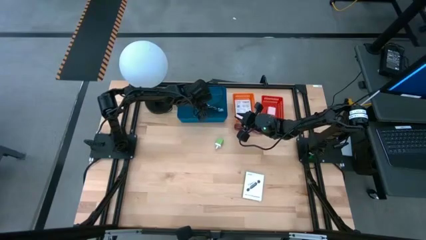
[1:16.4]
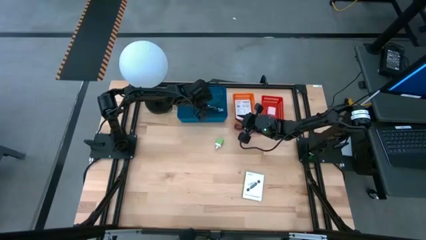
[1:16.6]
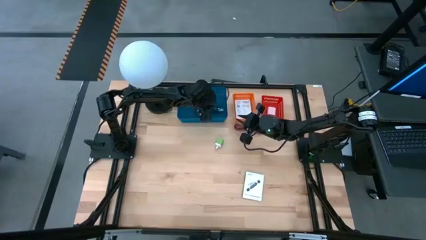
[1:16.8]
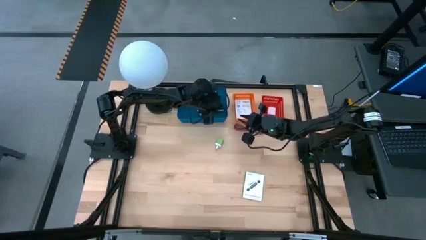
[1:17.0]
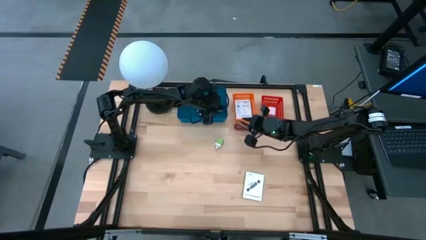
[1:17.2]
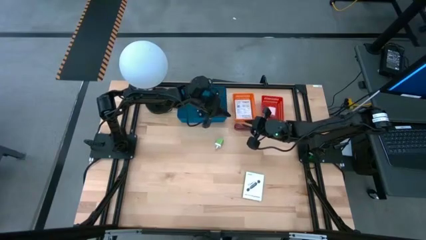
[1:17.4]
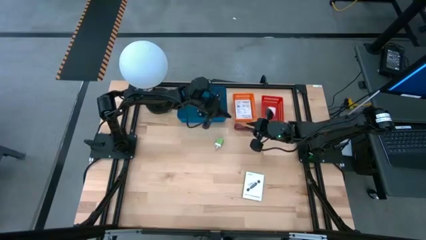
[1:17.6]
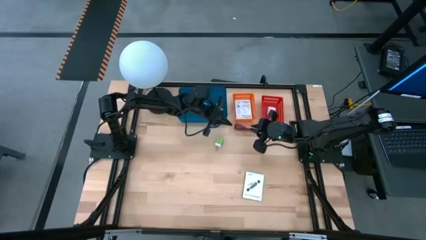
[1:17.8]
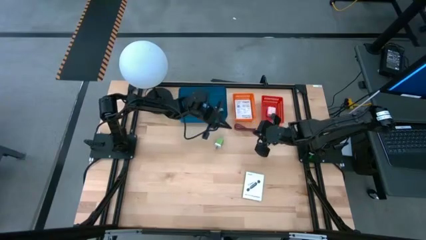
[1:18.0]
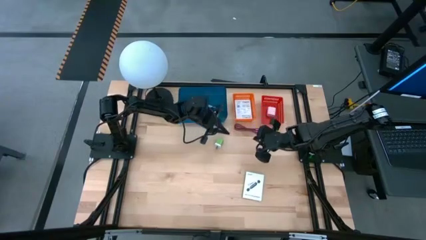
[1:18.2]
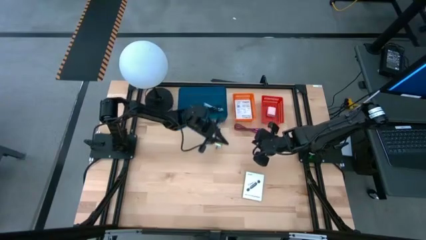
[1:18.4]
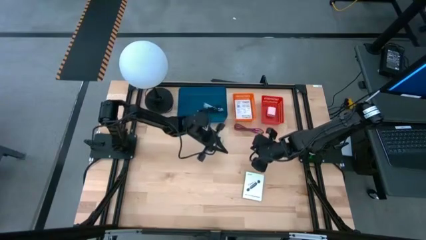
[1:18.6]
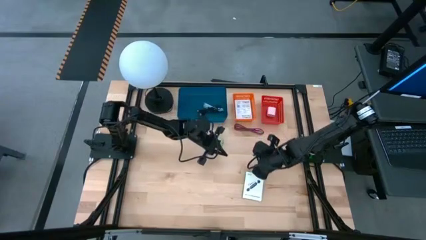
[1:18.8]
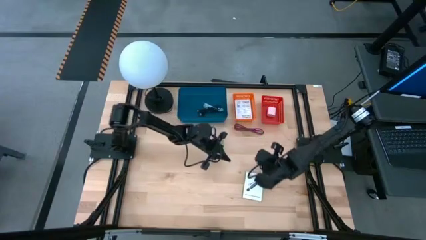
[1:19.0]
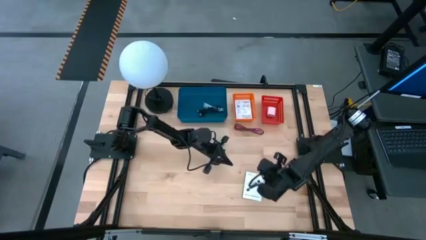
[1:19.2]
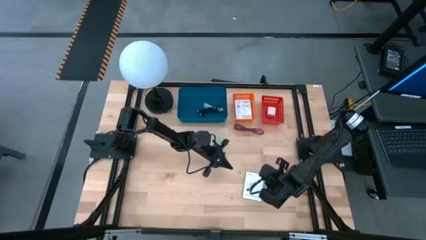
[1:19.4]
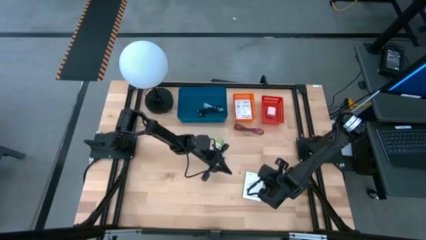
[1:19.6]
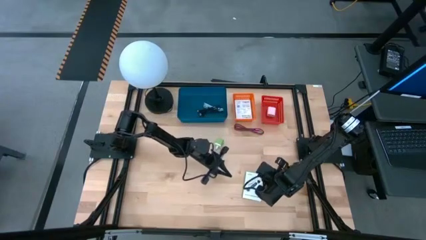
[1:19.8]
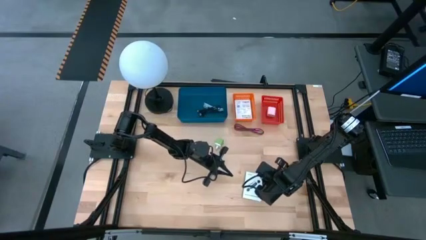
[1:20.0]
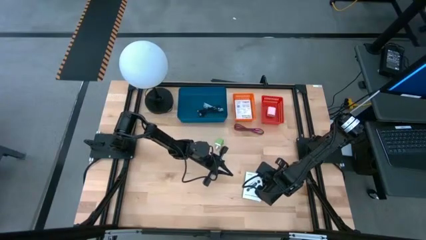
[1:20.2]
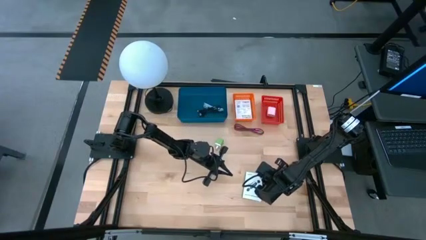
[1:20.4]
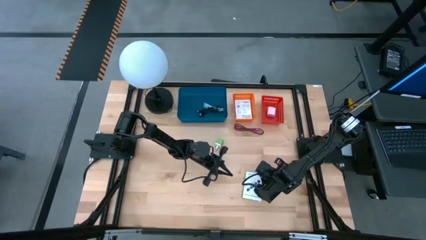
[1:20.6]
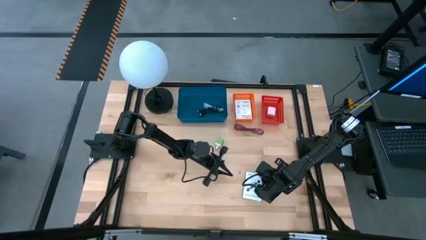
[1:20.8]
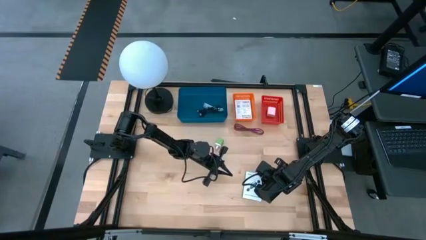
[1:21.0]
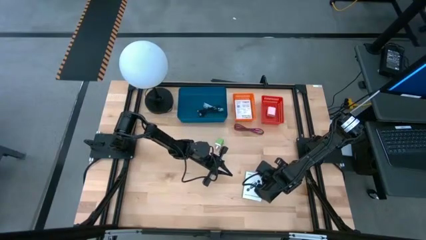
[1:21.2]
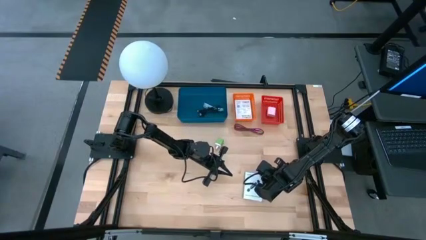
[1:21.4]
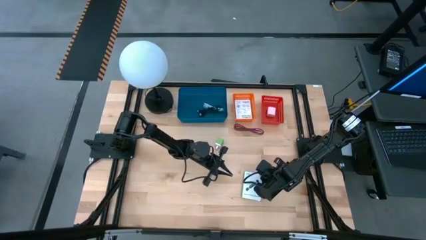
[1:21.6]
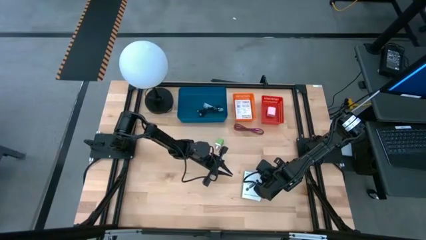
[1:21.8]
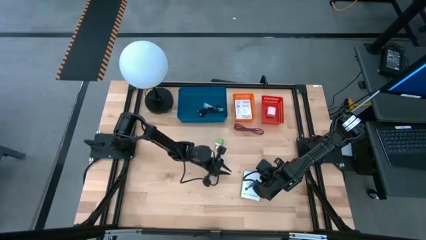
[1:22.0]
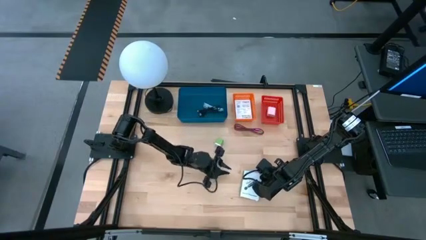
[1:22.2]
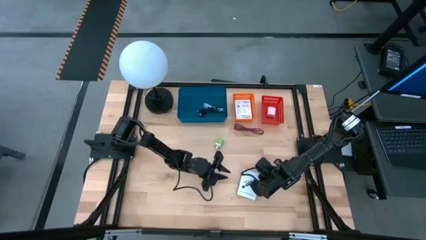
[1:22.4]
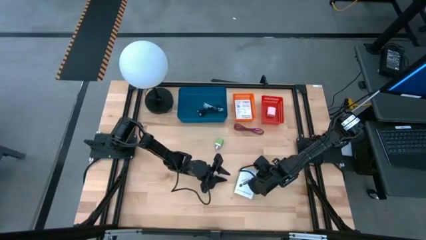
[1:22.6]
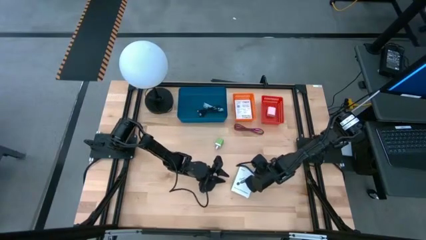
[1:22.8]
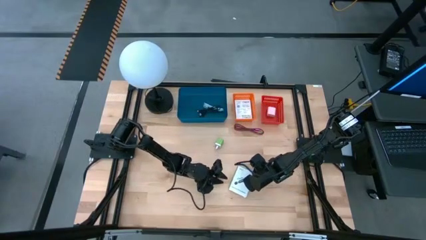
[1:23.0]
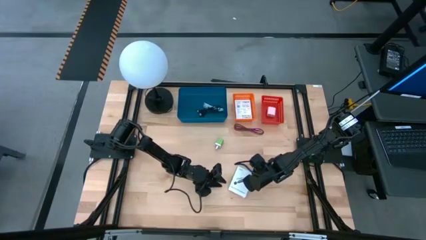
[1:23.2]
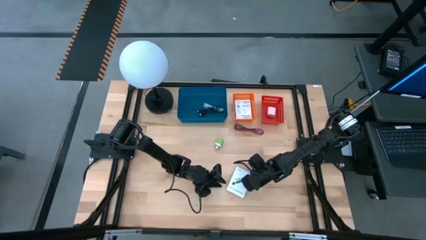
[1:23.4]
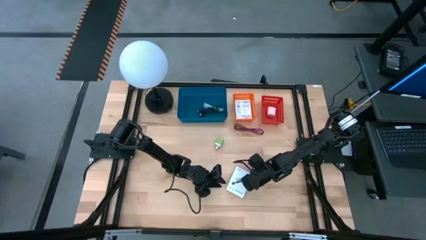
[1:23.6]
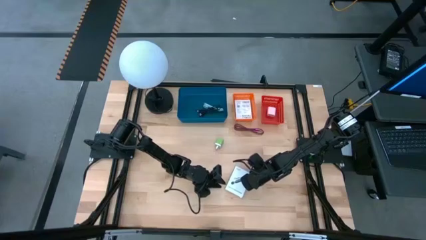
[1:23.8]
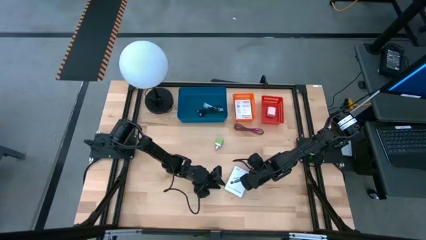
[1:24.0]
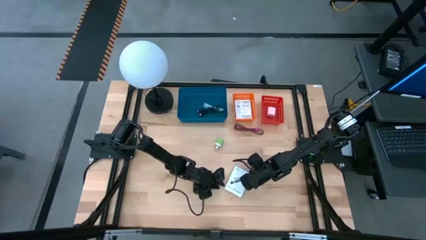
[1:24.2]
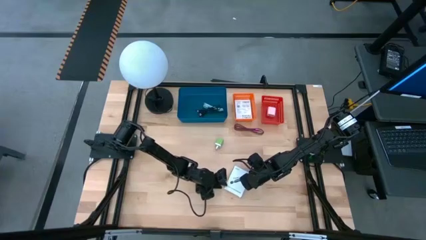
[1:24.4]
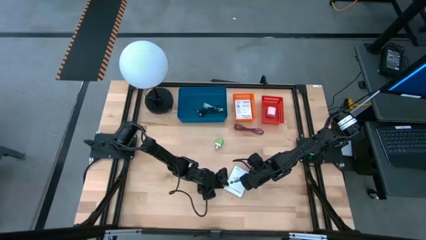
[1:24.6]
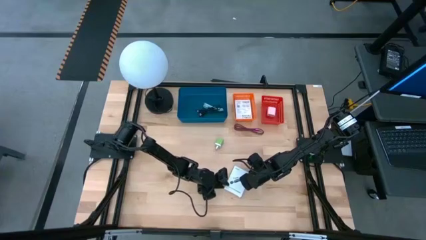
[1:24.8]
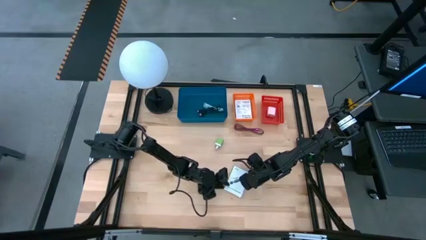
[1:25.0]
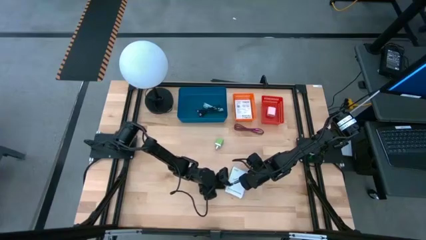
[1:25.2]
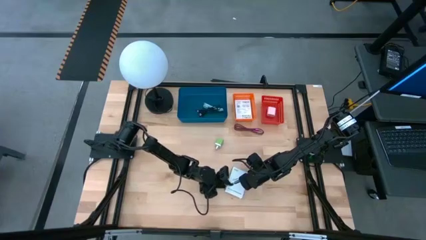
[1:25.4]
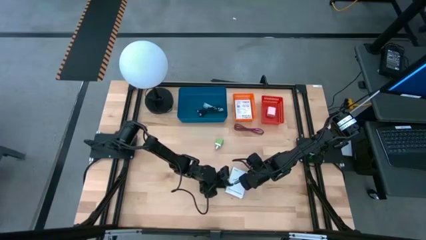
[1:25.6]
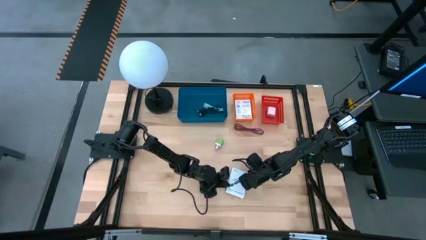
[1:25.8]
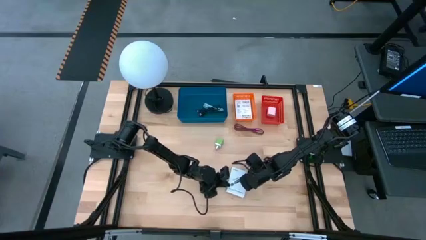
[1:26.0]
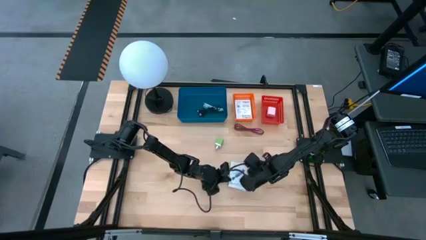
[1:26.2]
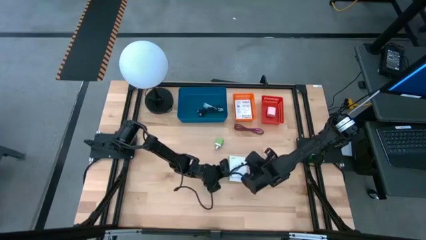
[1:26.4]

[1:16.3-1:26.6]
Task: Pick and place items into bin
Put the white card reader box into the orange bin

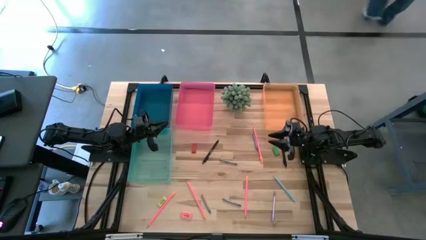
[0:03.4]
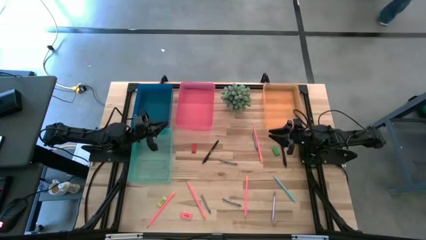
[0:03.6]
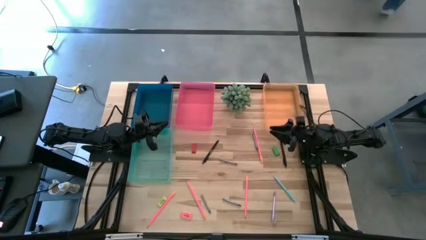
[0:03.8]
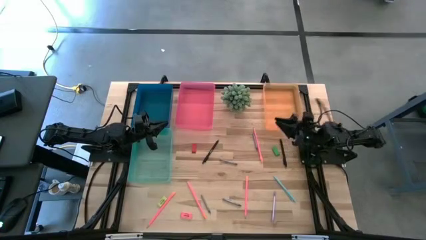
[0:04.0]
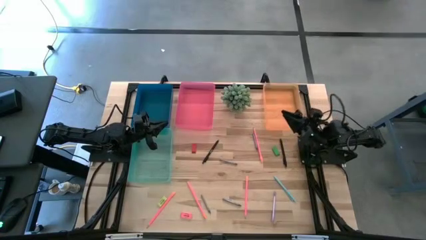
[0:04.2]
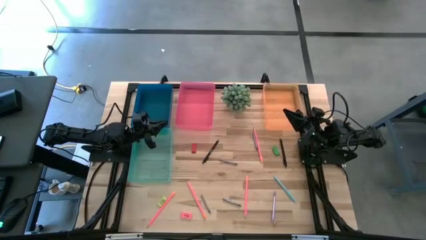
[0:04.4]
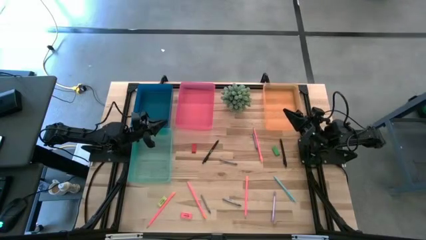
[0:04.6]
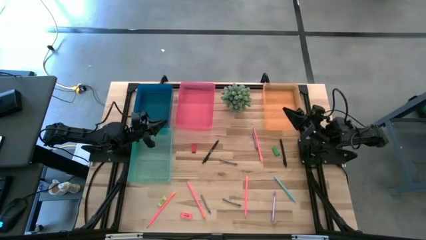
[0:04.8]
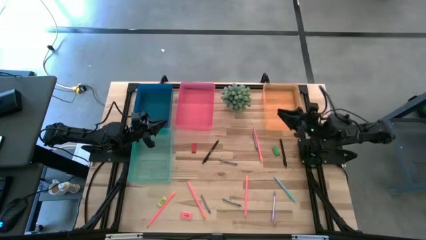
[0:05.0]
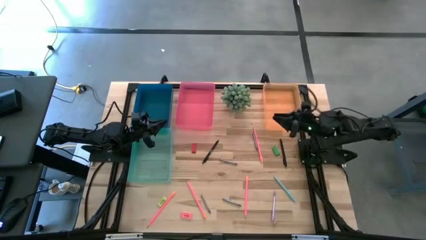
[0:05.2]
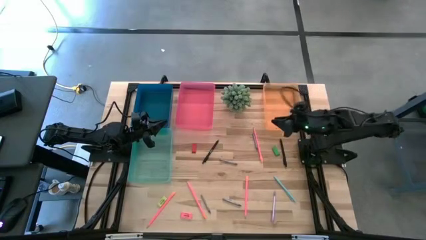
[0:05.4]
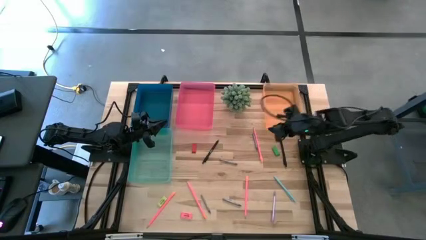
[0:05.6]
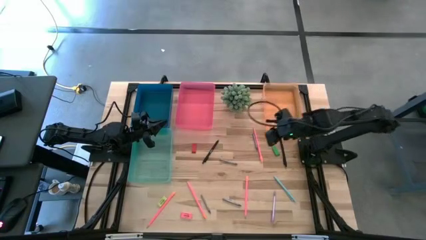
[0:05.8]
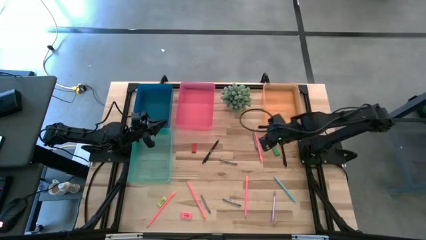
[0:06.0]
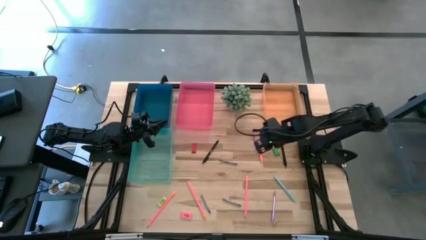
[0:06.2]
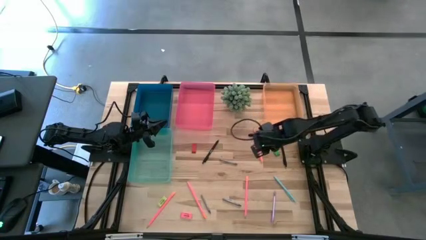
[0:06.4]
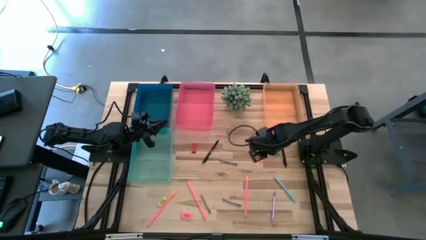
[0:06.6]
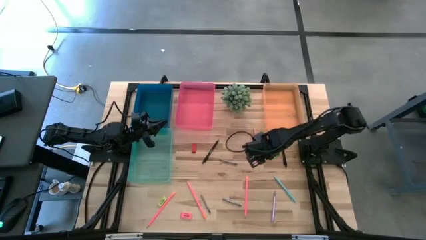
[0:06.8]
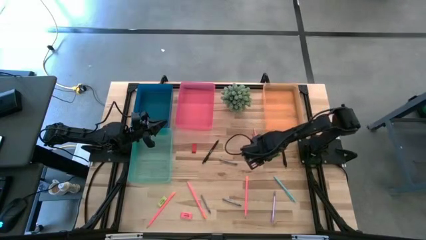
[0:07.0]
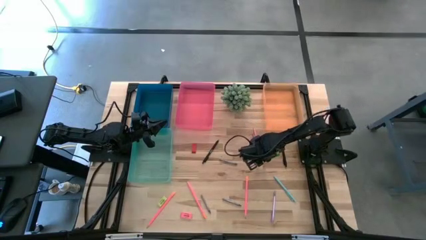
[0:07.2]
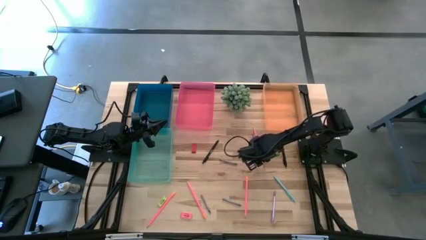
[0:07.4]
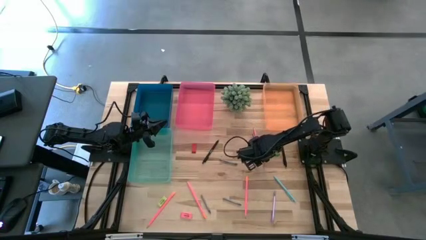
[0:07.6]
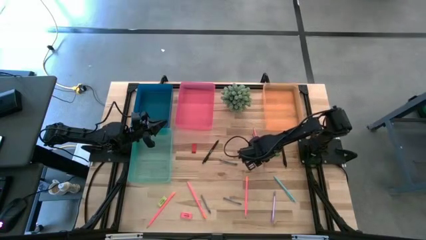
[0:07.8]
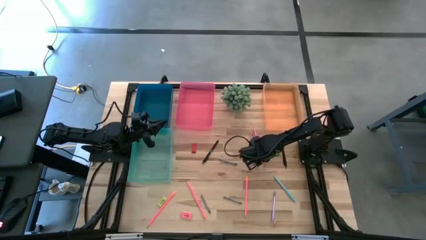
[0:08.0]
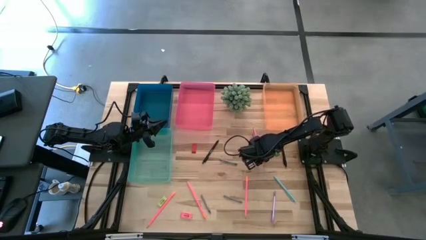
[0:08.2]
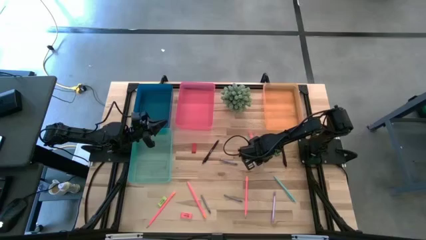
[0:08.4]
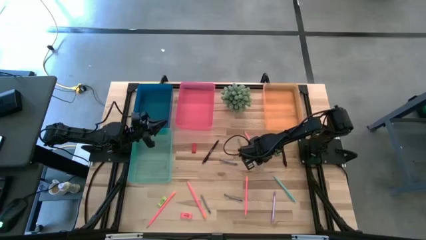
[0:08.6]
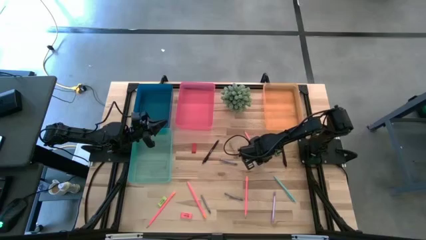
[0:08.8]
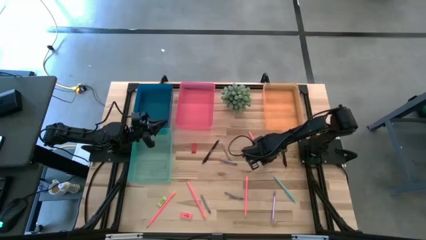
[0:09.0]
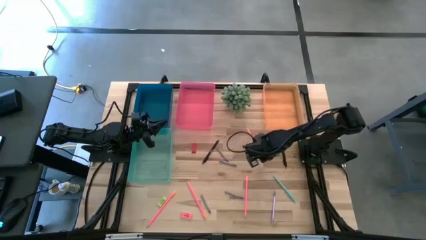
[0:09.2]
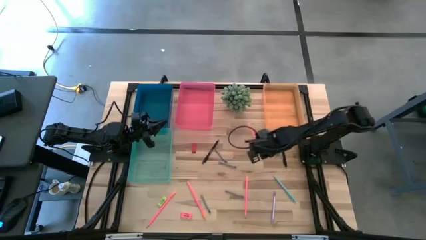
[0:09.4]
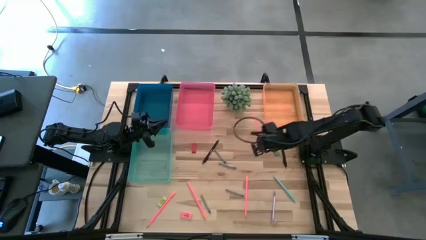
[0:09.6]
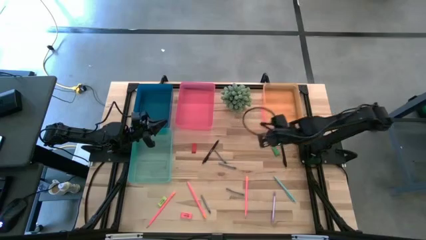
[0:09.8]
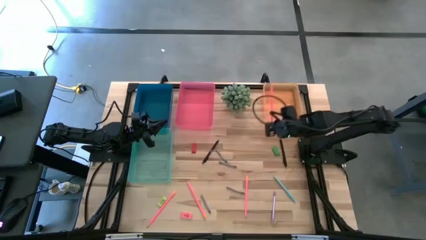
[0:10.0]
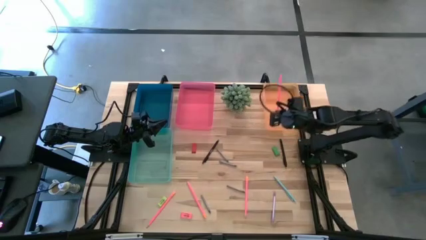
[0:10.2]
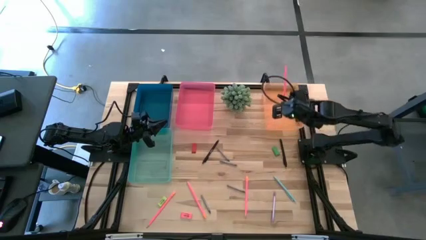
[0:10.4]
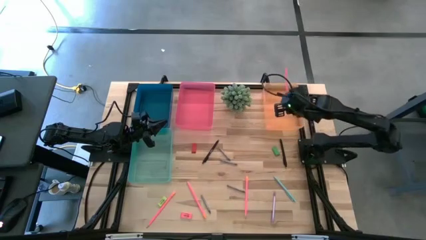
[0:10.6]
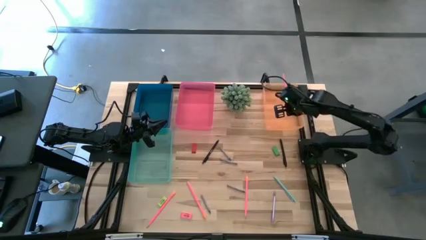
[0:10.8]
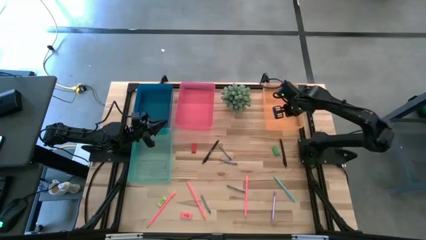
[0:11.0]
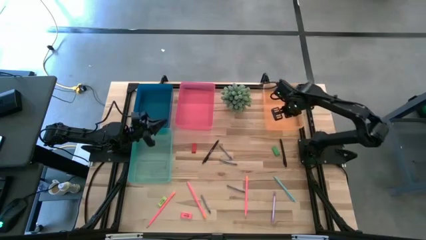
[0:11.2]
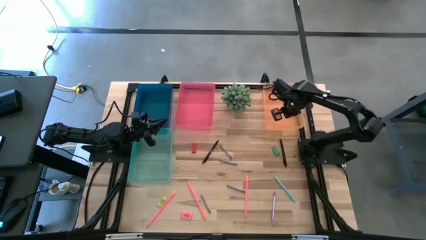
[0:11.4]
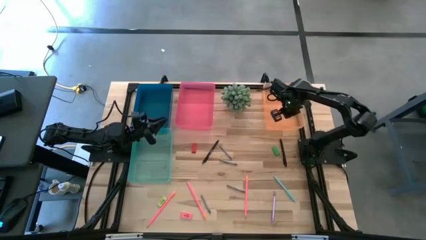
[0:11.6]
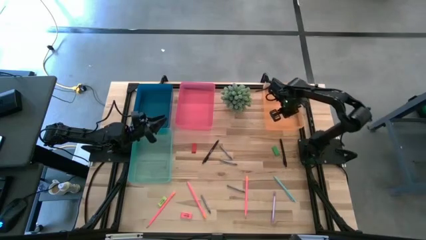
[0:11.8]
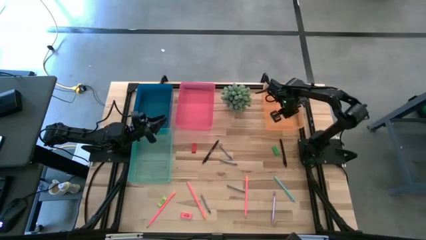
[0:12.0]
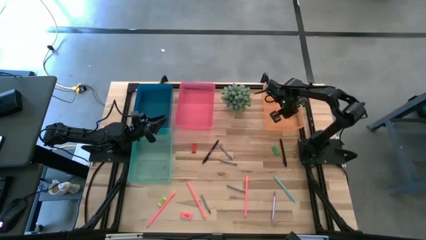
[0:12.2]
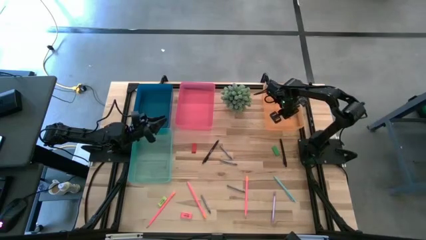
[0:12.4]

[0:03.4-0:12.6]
Task: Sort crayons/erasers/pens/pencils in bins
Put the pink pencil into the orange bin
